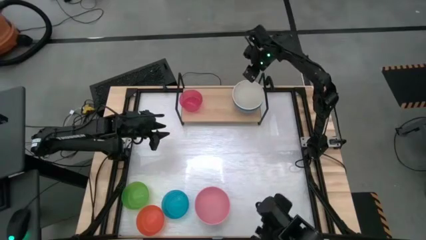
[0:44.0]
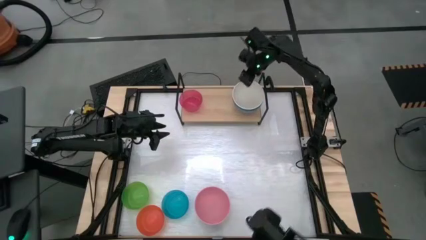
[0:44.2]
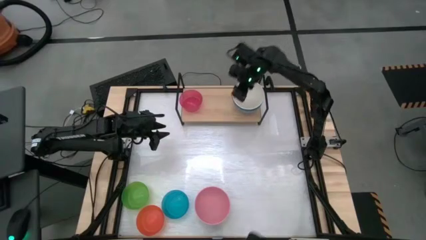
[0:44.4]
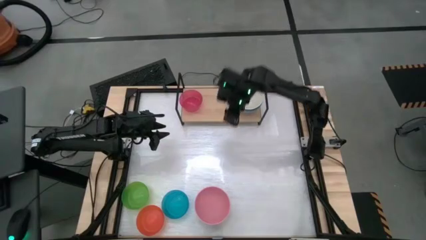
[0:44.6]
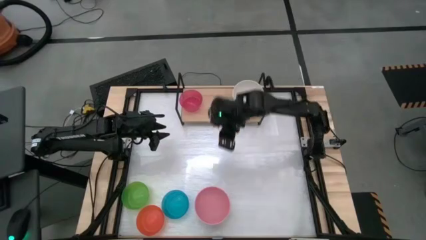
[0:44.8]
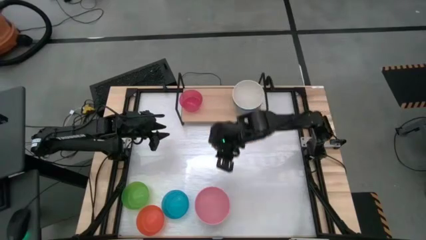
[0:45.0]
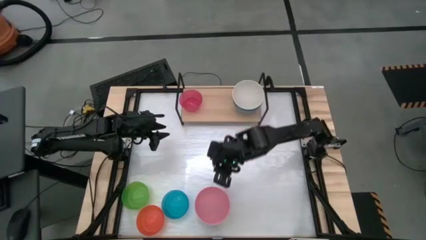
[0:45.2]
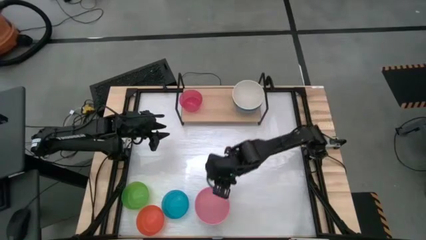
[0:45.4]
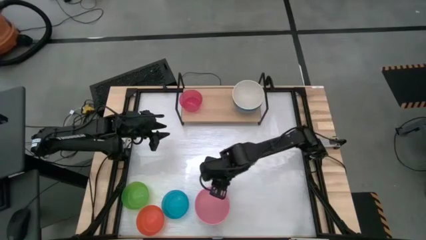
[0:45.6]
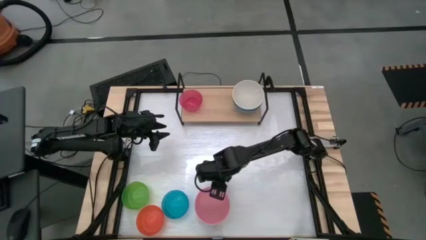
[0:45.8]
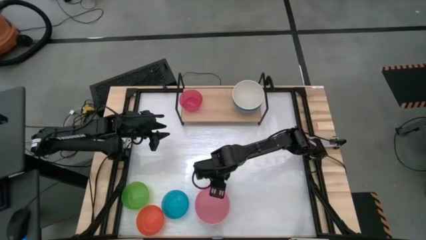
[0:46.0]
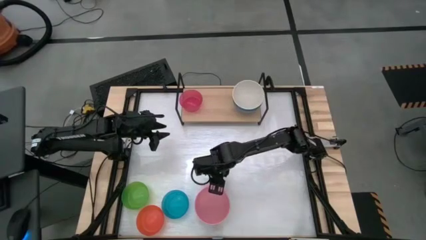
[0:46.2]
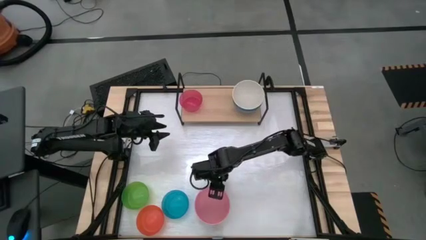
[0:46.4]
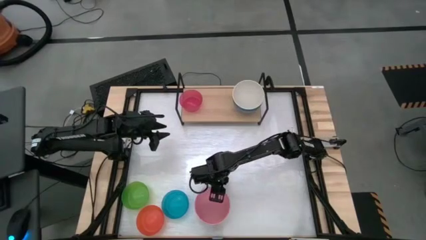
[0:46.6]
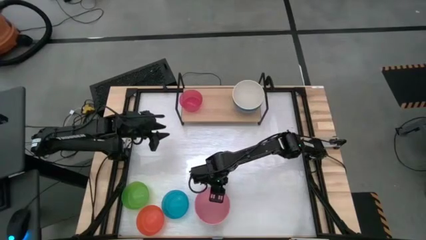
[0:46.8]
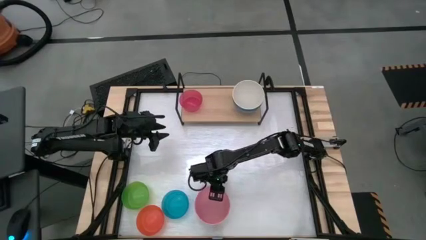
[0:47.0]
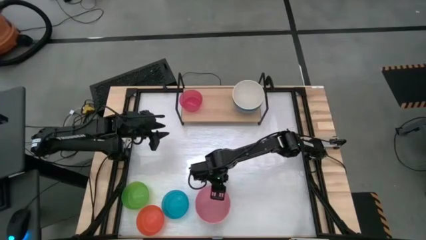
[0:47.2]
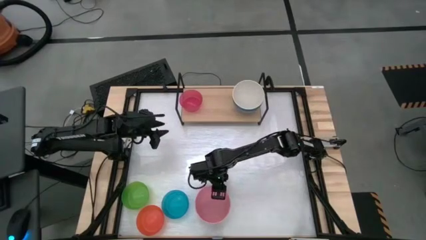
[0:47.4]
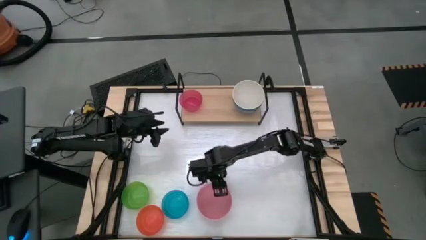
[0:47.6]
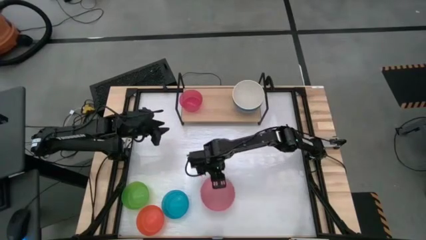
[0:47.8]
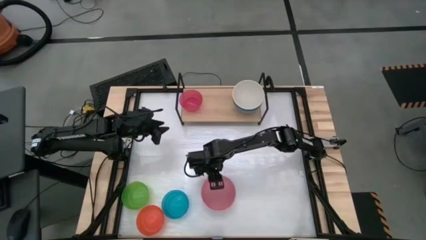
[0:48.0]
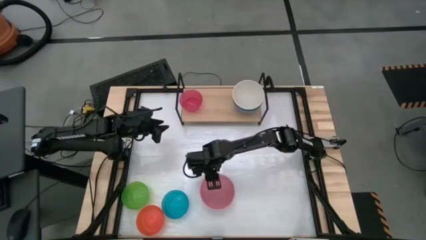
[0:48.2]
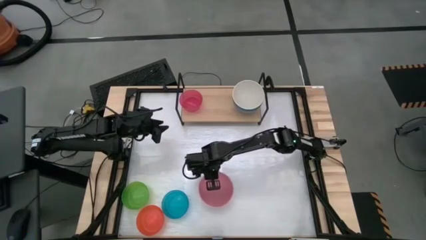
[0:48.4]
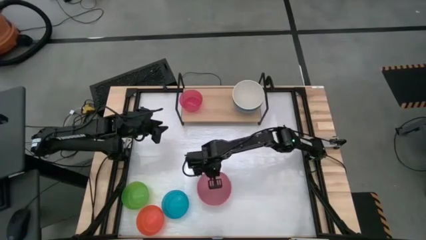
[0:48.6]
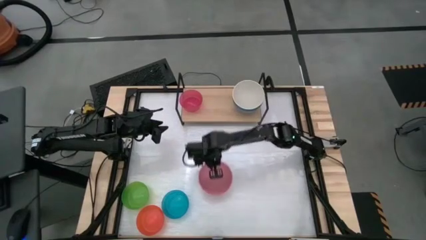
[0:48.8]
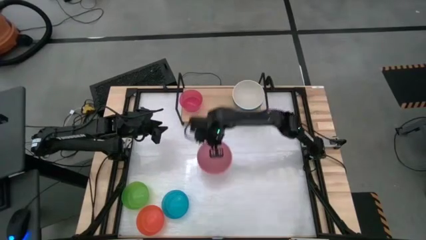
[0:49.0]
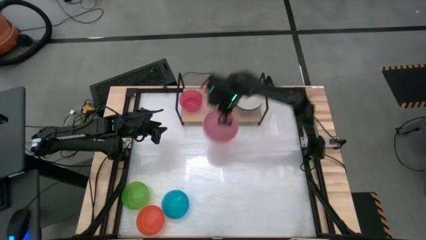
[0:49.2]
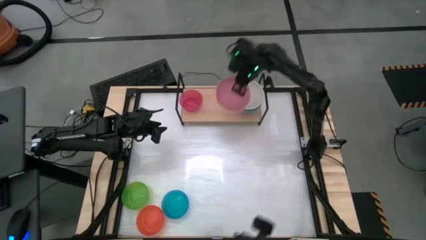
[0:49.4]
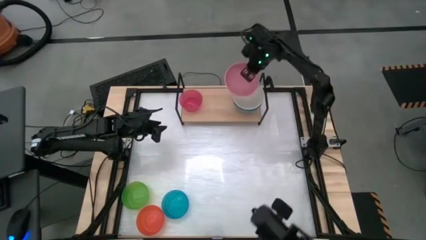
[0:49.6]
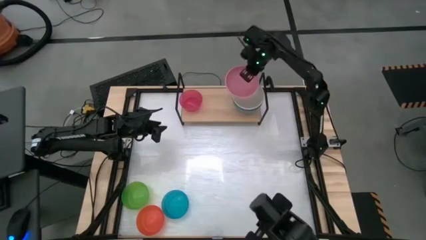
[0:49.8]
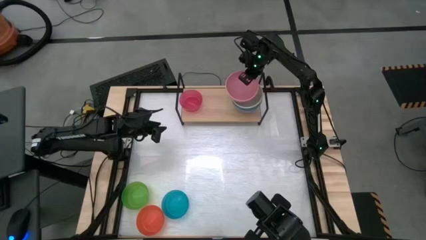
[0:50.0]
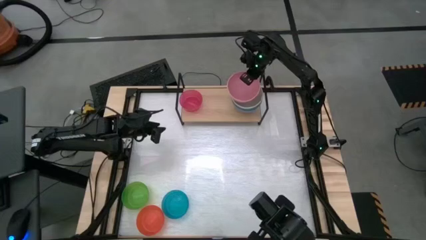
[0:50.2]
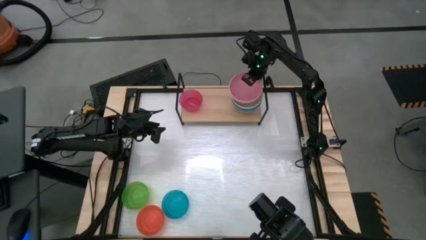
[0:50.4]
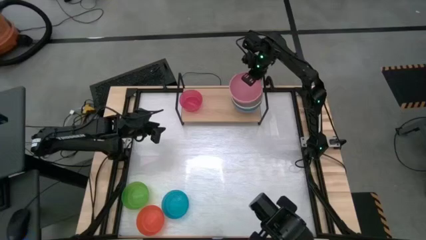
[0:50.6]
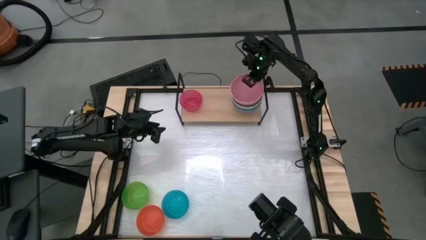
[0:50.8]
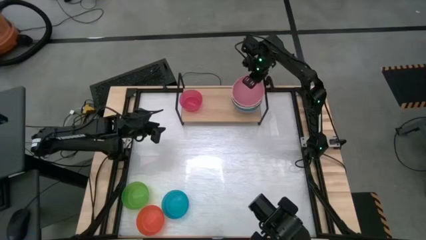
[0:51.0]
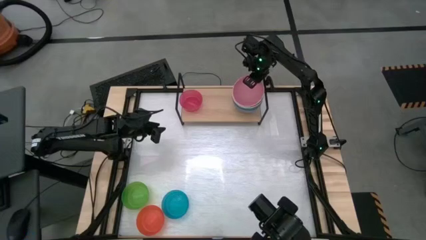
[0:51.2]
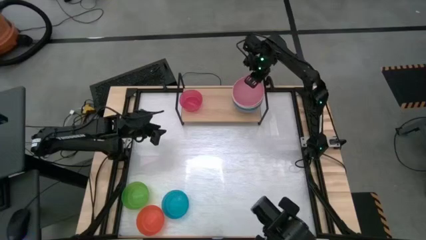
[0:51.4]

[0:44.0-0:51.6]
Task: Place and stack bowls onto a shelf
Stack the large pink bowl on top of the large white bowl on the shelf

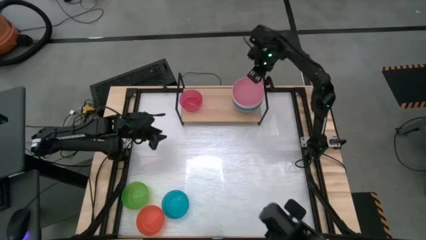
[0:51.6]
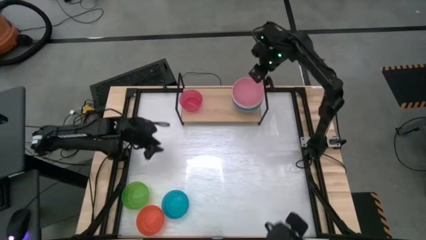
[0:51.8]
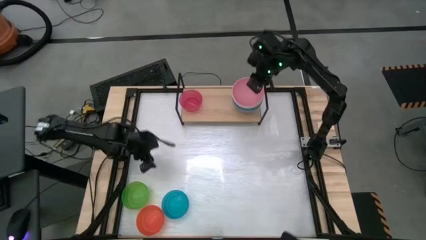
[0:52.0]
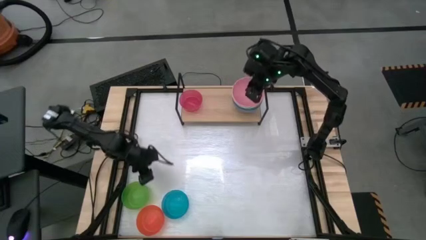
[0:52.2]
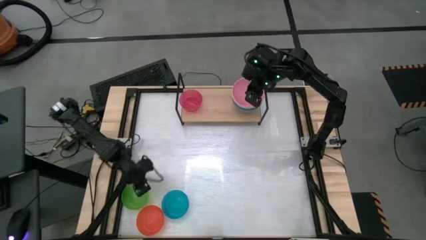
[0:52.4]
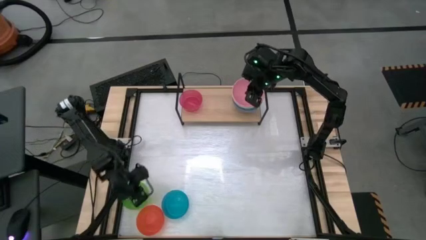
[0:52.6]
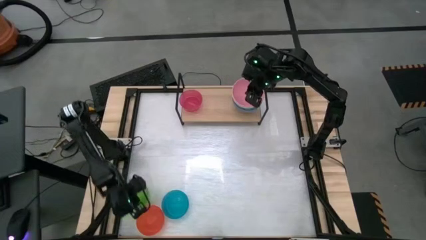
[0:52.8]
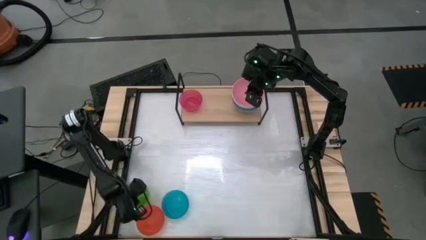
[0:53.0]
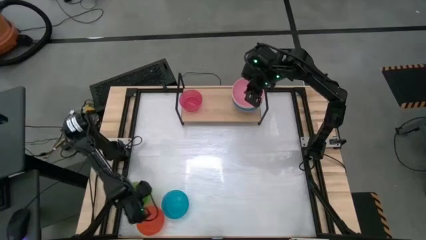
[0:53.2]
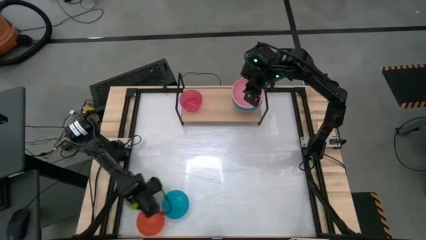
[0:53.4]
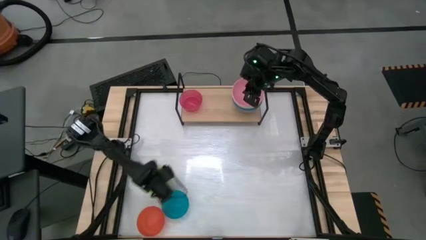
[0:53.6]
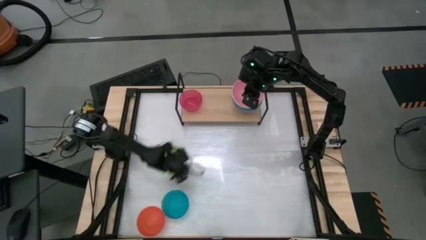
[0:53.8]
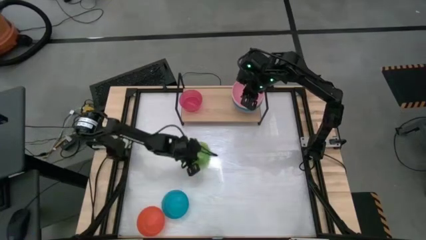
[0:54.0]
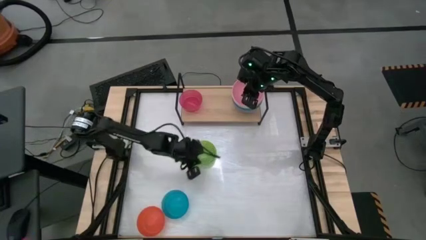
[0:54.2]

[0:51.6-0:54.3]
Move the small light green bowl to the center of the table

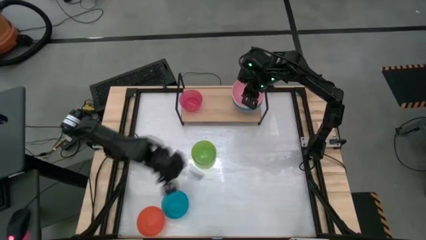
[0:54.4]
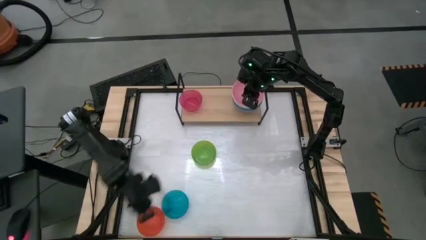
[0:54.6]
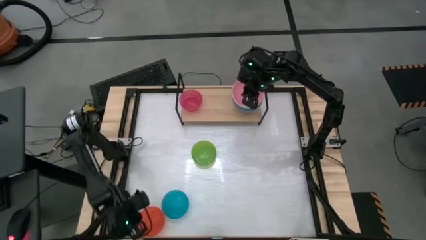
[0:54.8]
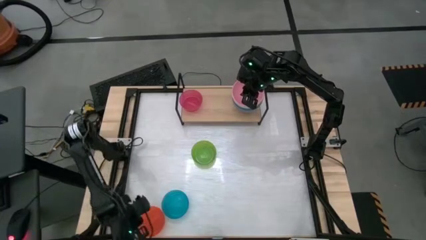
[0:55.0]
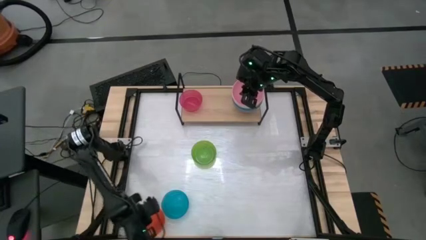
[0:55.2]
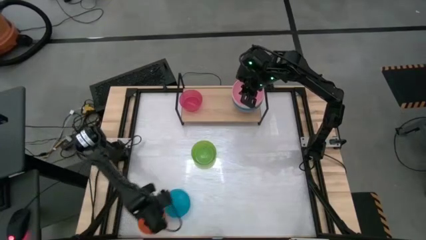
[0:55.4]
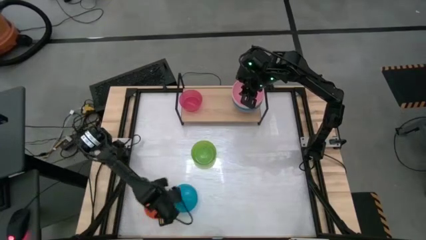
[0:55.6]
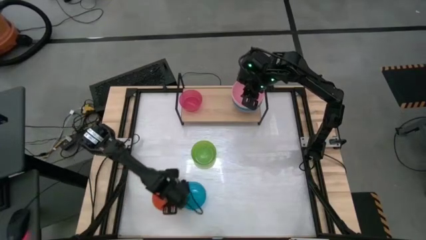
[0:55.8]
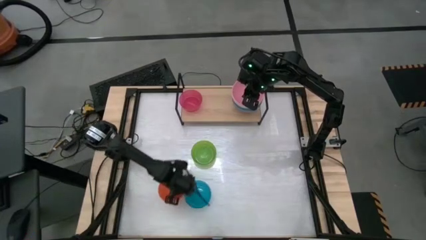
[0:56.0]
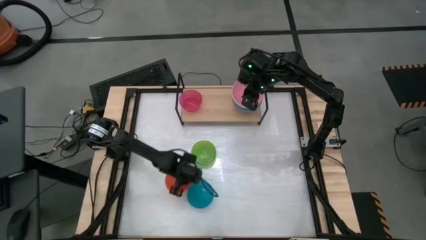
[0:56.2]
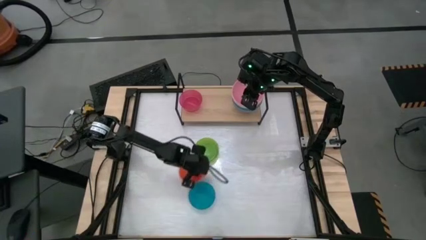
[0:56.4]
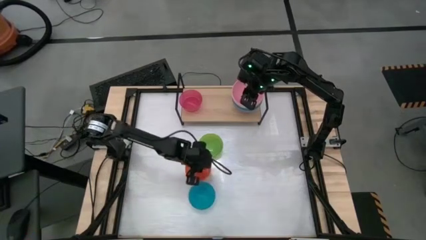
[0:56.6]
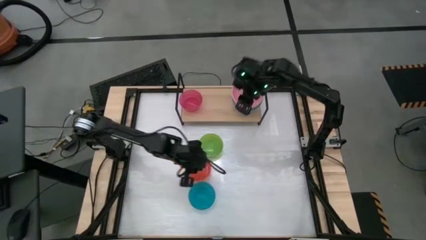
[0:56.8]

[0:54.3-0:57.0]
Move the small bowls to the center of the table

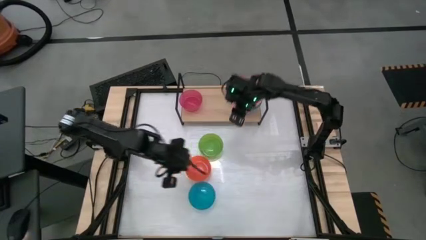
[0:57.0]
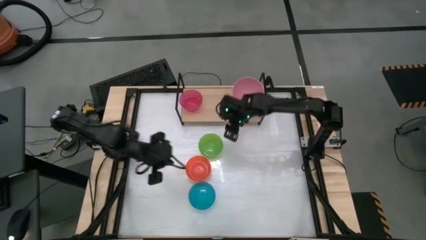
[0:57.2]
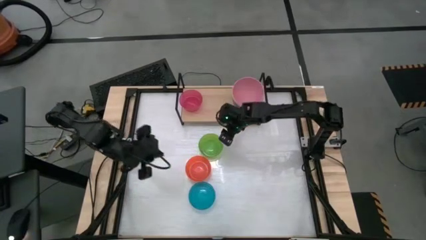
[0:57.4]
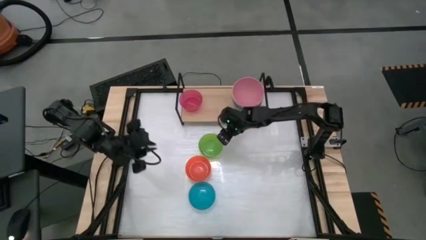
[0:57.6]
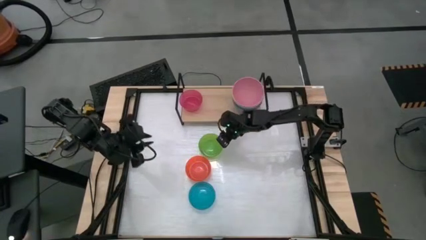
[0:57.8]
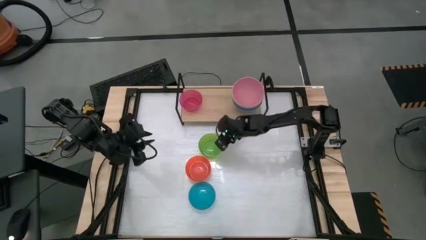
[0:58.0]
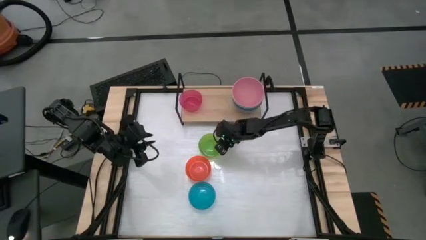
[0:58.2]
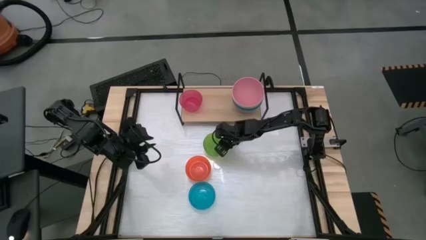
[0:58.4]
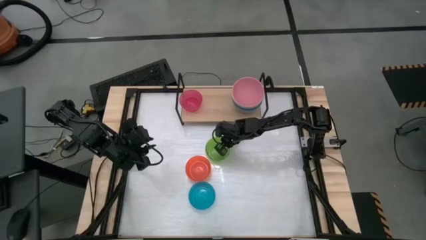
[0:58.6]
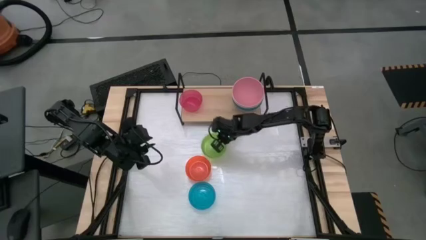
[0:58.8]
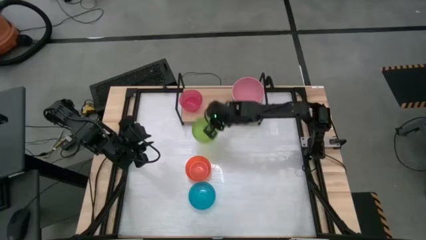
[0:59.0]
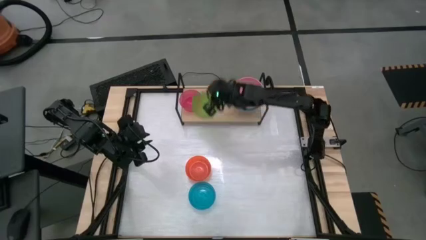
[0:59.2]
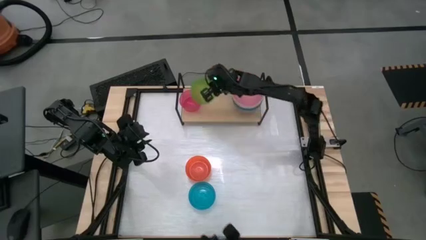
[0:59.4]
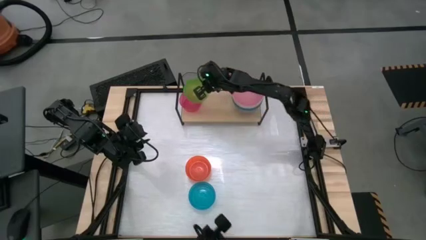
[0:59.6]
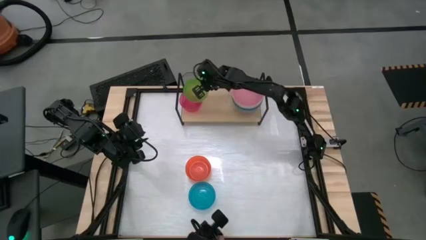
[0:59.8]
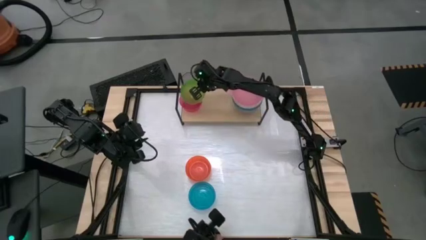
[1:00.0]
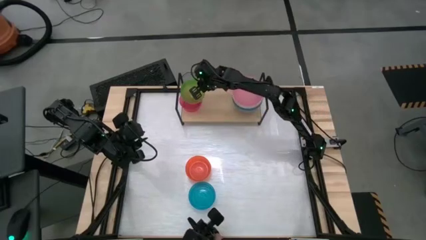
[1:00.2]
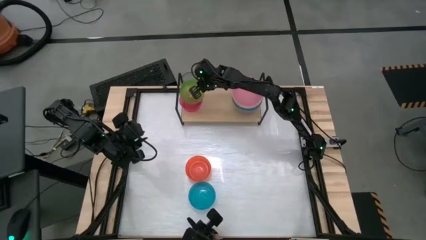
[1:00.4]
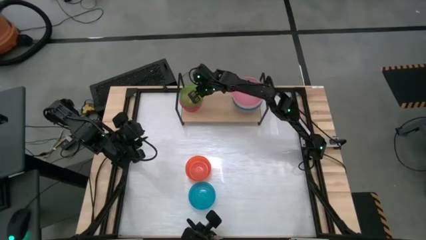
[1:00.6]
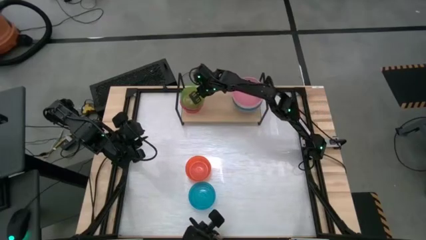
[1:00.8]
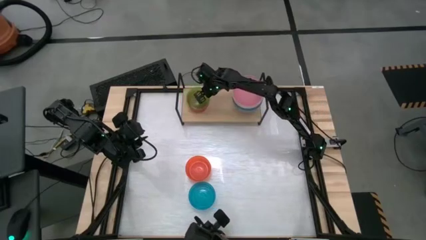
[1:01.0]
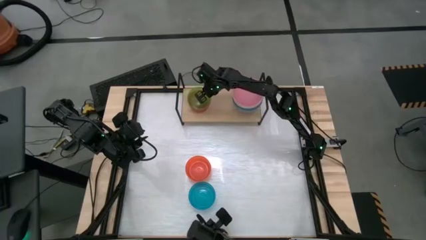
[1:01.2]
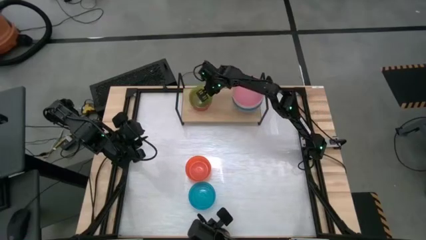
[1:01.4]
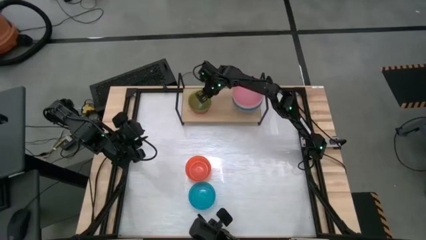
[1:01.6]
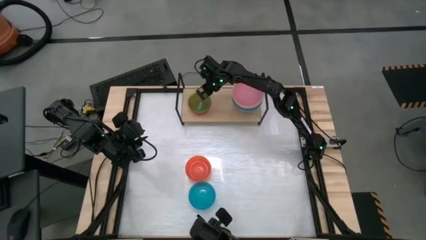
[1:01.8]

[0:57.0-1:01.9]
Stack the small light green bowl on top of the small pink bowl on the shelf
